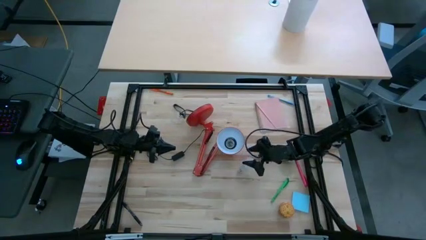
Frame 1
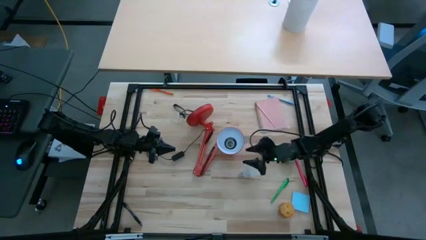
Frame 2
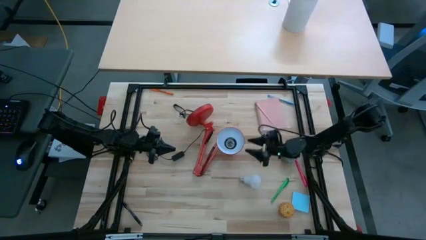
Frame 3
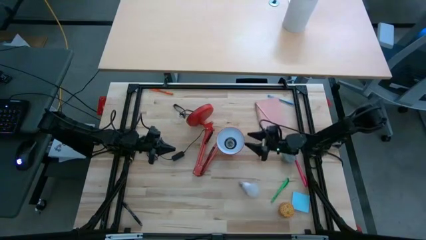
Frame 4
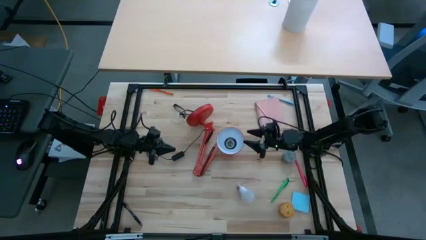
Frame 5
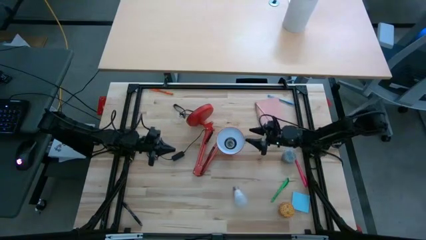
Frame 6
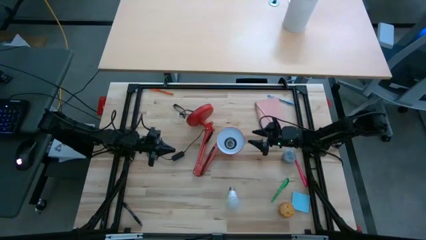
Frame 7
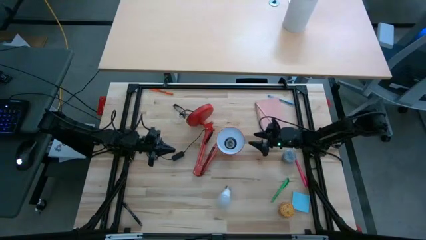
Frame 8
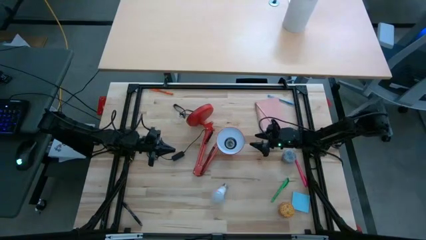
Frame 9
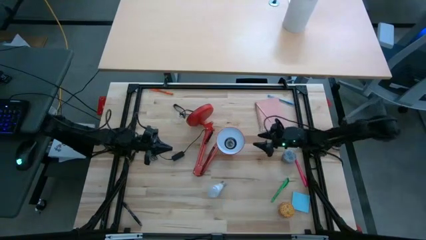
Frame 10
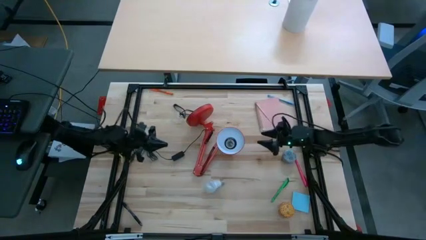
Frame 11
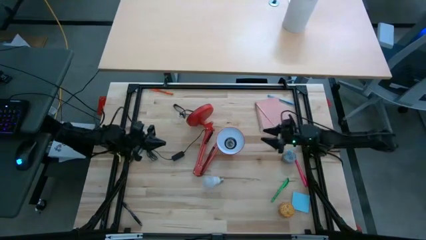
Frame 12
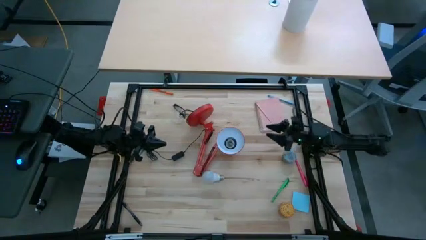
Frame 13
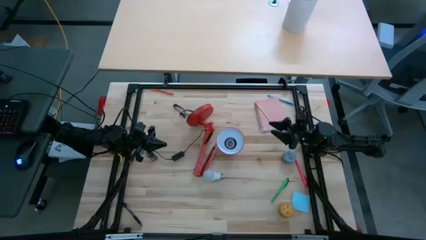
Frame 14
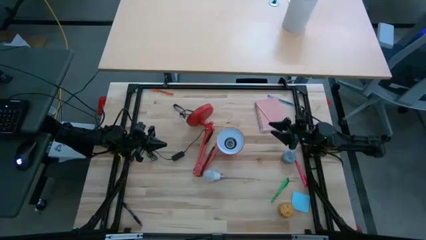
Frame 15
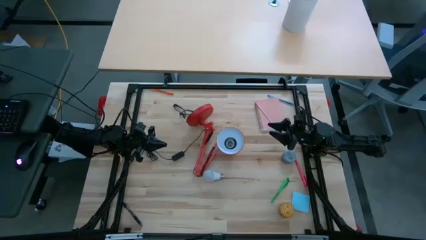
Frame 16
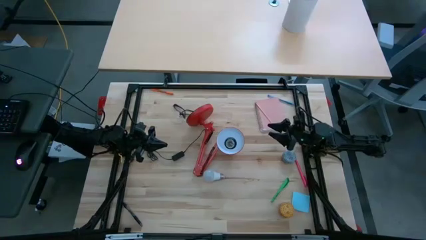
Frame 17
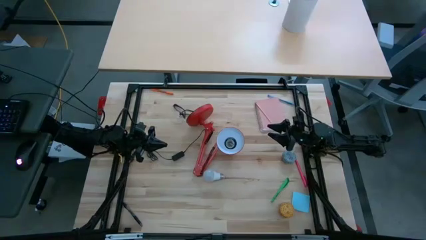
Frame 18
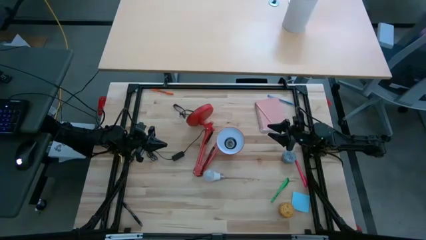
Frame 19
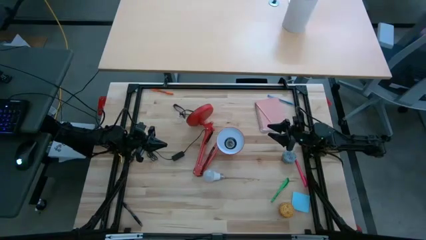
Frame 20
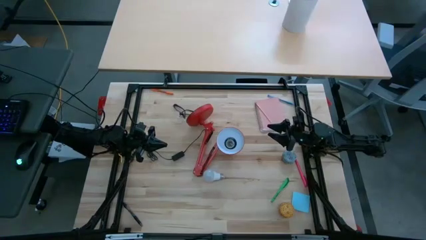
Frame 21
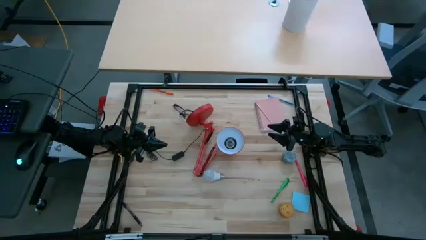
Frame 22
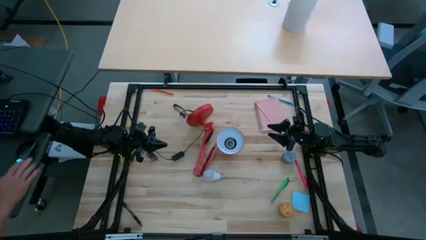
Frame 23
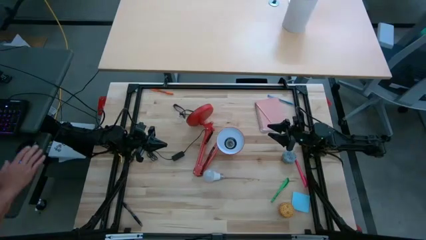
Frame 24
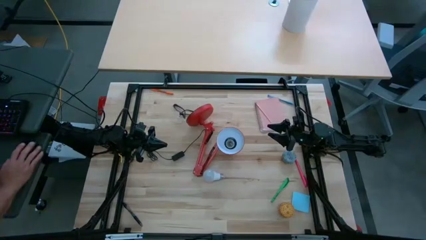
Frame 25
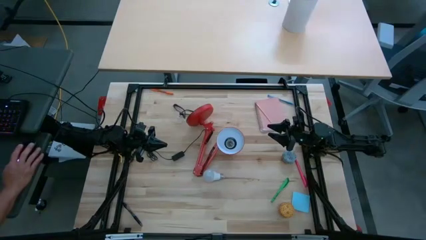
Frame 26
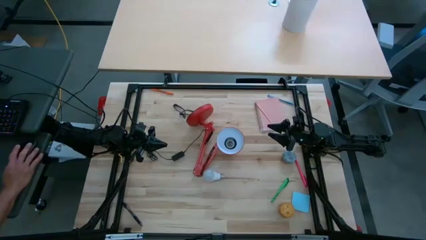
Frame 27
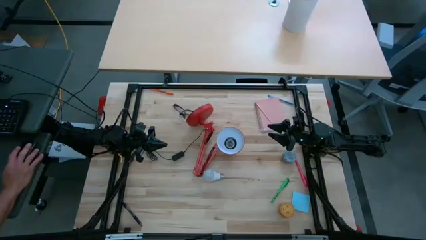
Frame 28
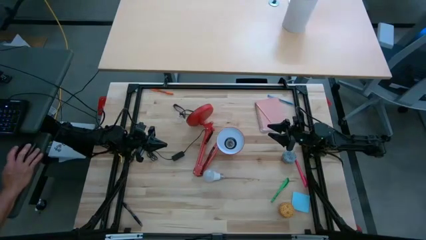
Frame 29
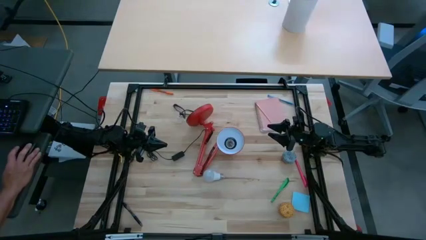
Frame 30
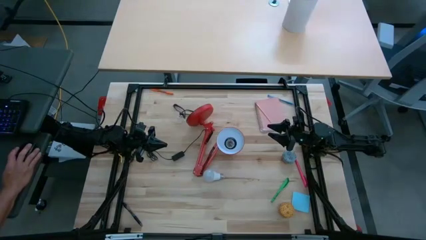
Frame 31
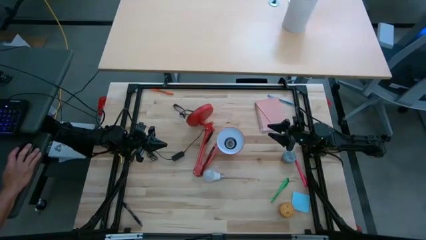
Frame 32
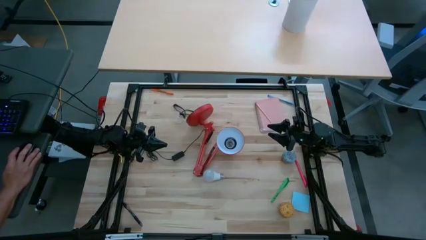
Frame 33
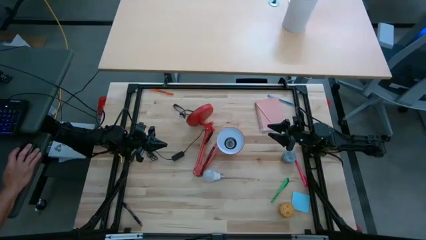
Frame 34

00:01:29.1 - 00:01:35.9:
Task: Screw lightbulb
Return to Home Position

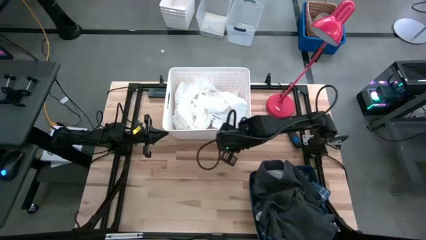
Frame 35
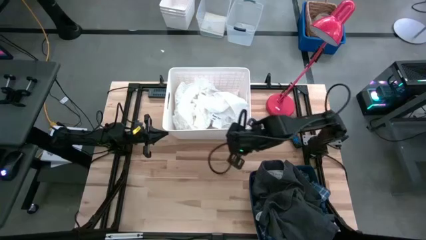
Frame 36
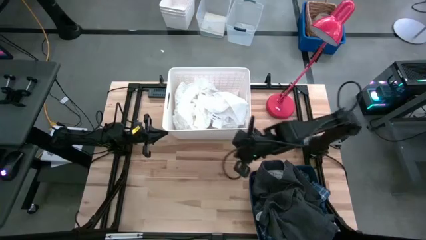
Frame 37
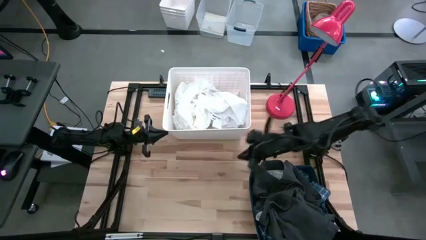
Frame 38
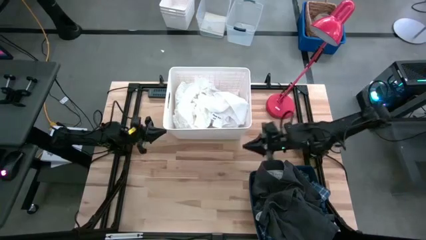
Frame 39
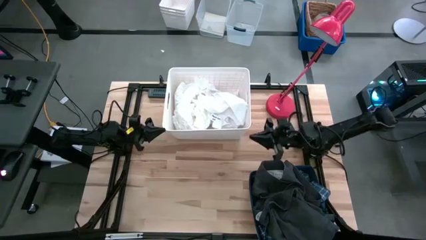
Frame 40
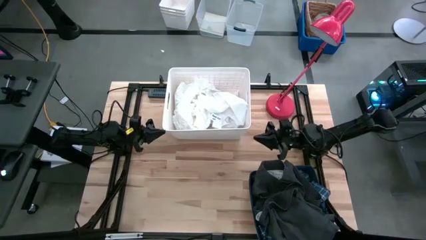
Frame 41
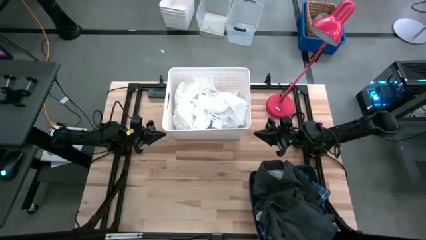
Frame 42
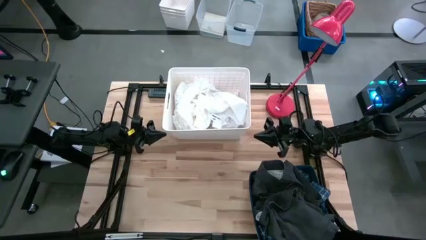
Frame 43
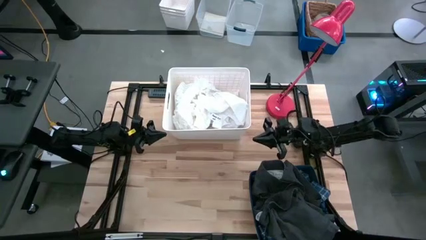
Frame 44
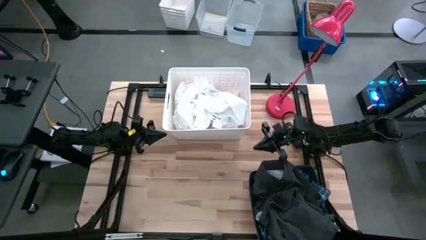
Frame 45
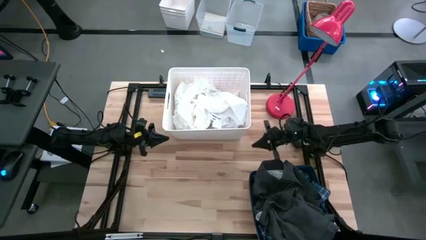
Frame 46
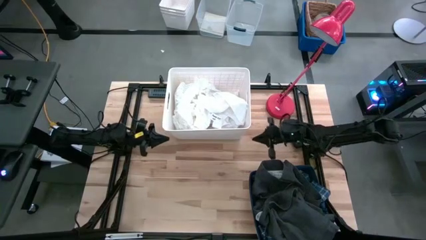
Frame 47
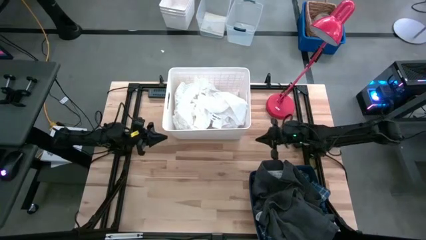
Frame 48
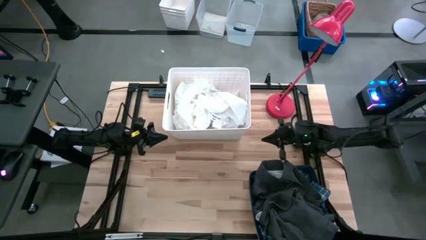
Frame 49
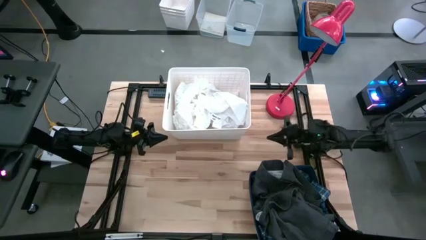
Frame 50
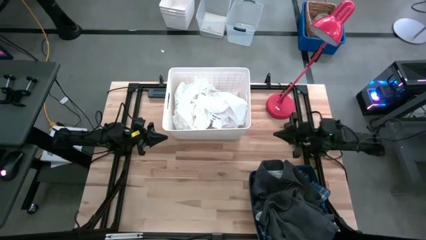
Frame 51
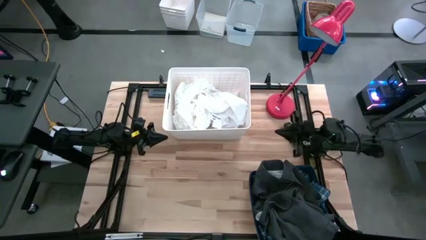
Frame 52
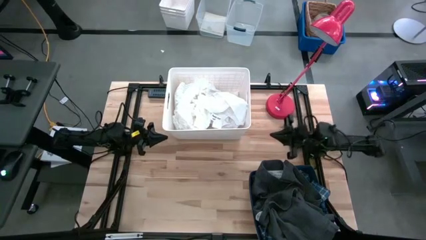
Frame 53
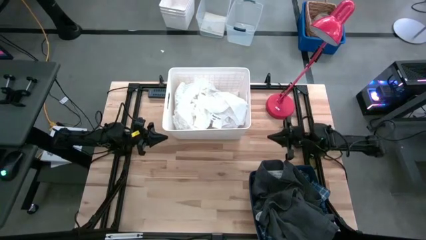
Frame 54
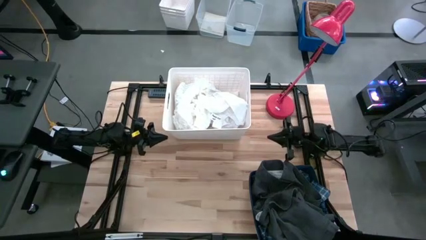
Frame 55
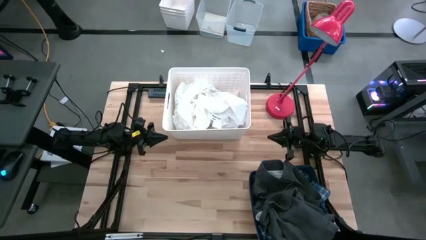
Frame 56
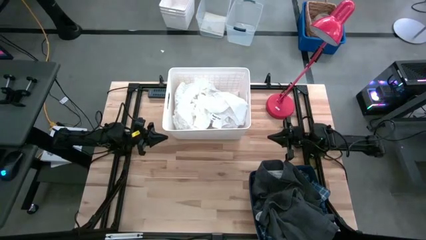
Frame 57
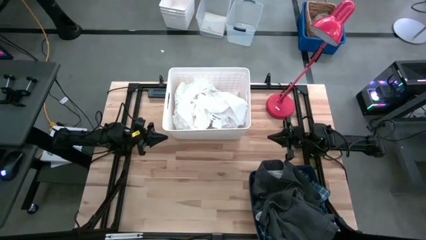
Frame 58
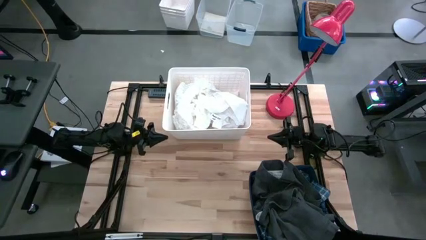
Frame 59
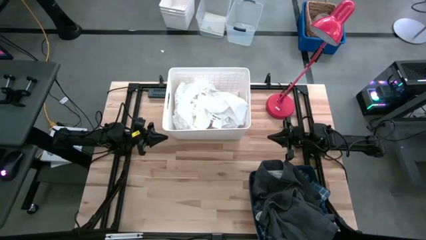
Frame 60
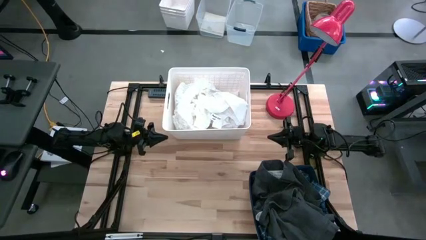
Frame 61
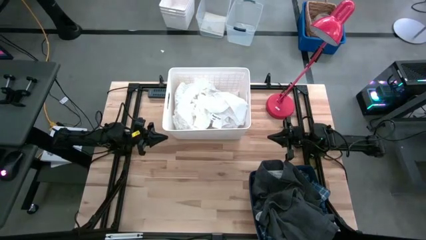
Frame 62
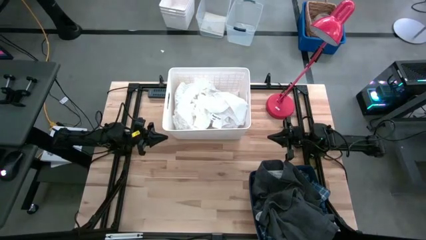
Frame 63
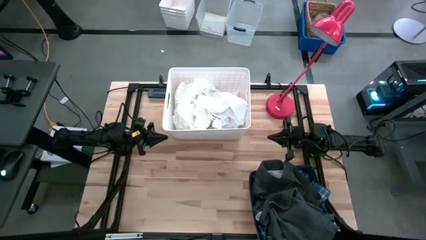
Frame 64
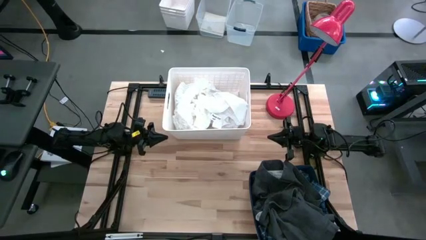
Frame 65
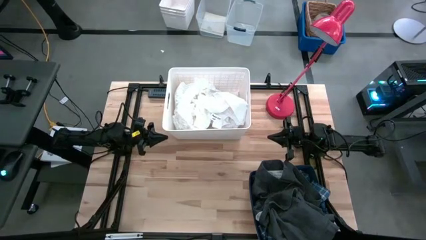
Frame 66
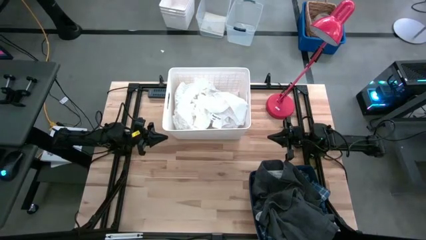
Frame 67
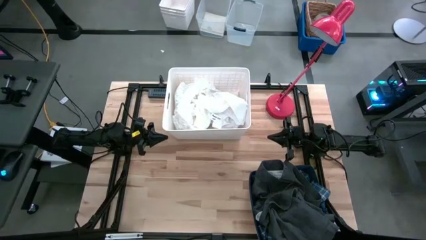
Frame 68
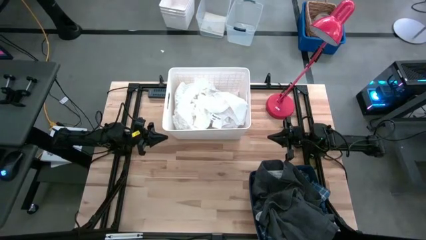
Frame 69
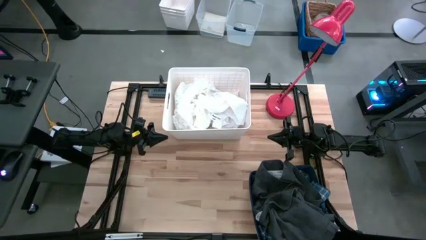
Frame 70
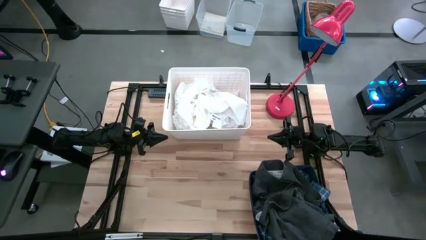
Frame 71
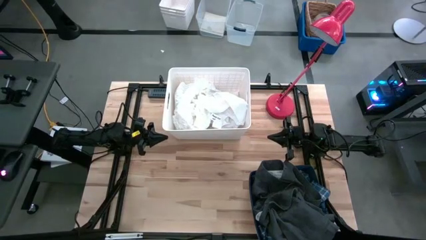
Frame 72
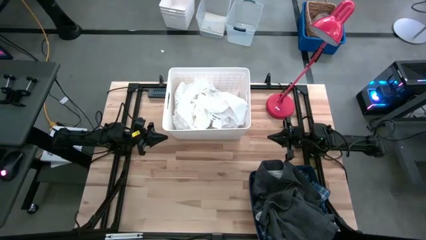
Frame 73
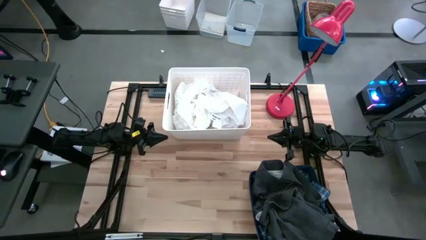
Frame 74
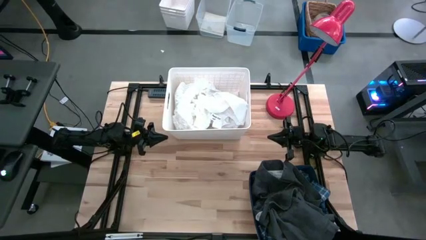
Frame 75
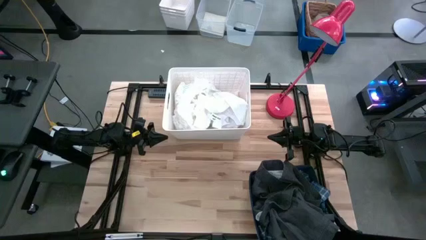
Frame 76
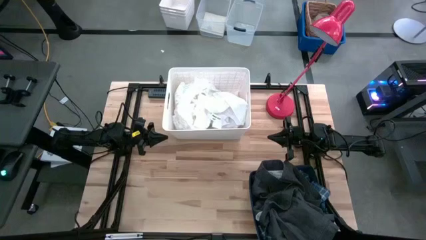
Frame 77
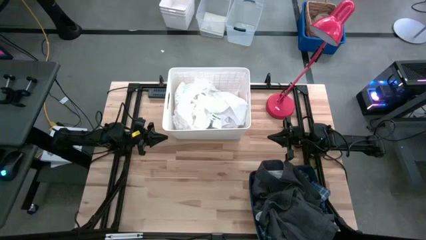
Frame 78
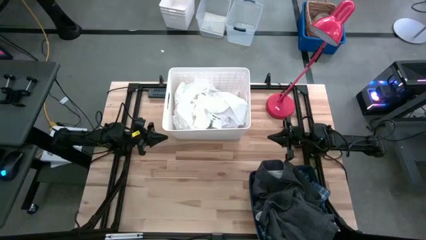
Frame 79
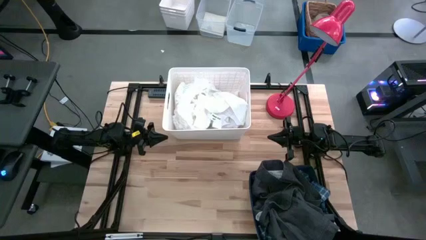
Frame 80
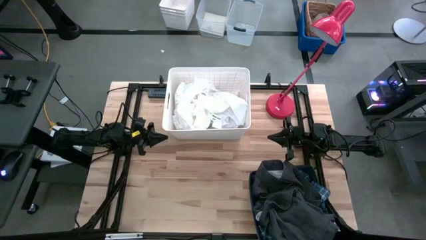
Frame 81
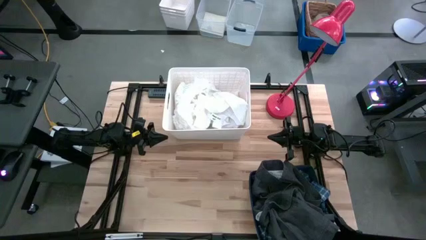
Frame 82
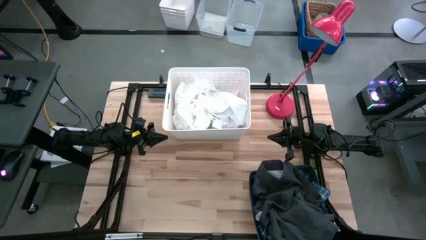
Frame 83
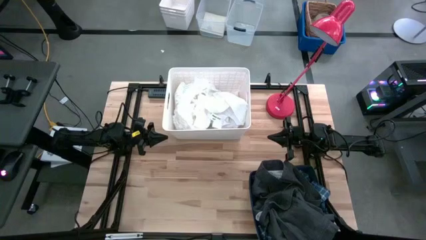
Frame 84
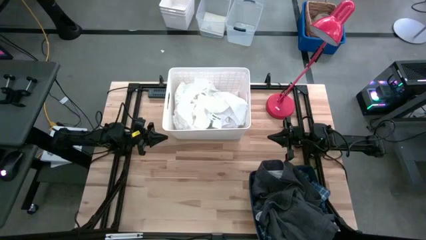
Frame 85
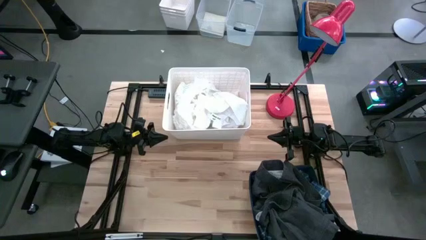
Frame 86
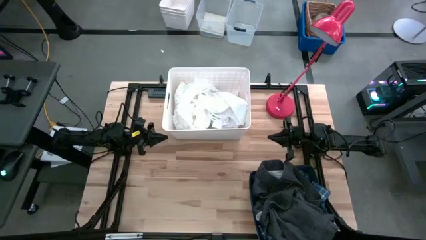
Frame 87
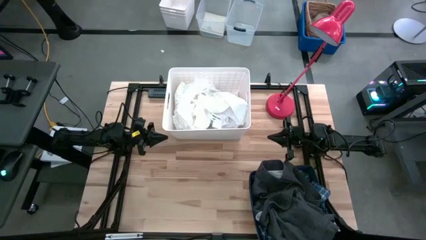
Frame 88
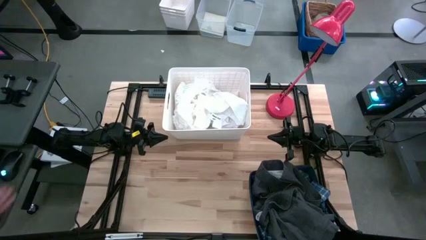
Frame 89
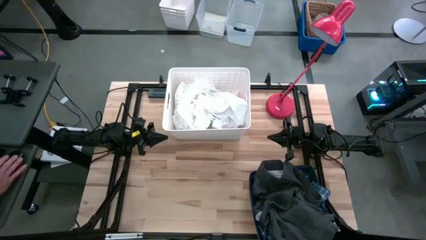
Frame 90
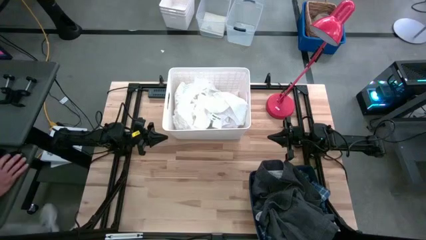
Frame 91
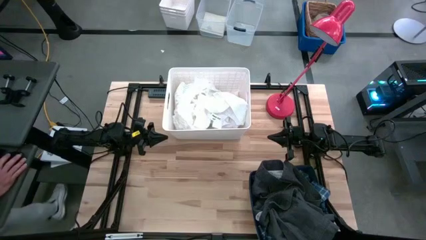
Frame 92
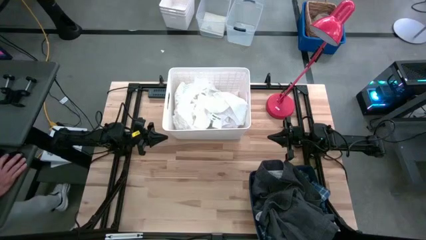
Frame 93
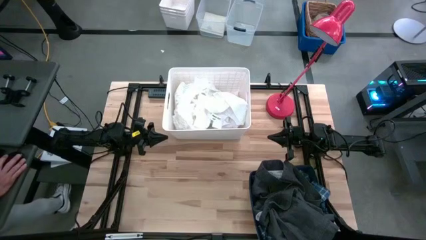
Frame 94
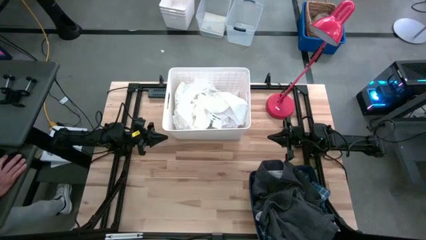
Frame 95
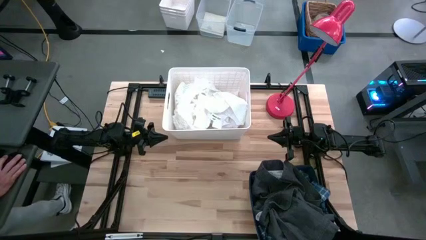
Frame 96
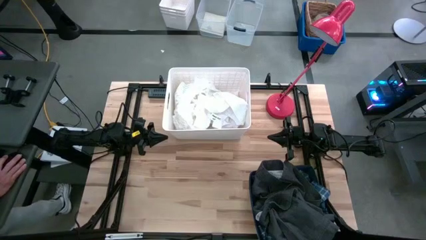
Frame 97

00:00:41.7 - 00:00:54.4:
Task: Sort clothes
Return to Home Position
